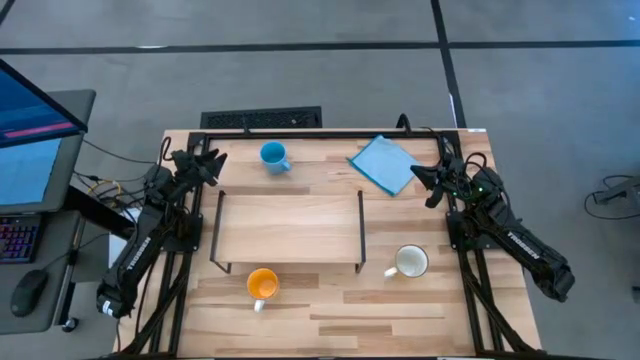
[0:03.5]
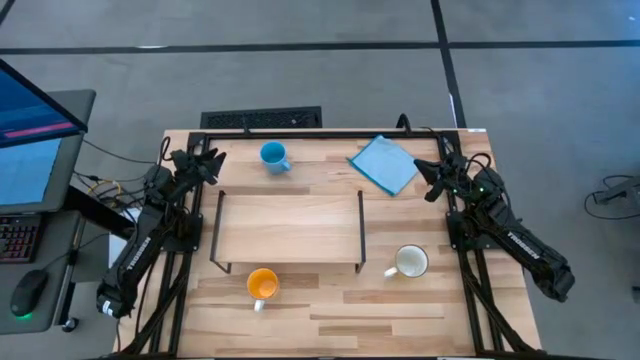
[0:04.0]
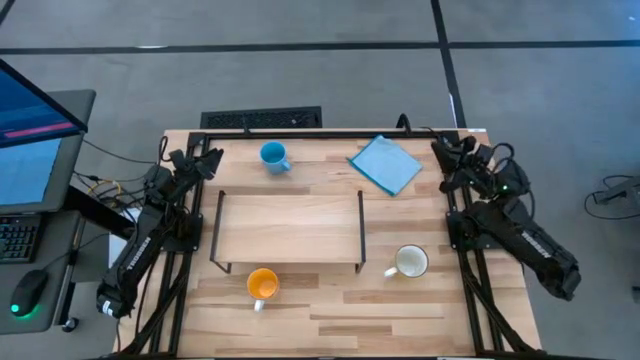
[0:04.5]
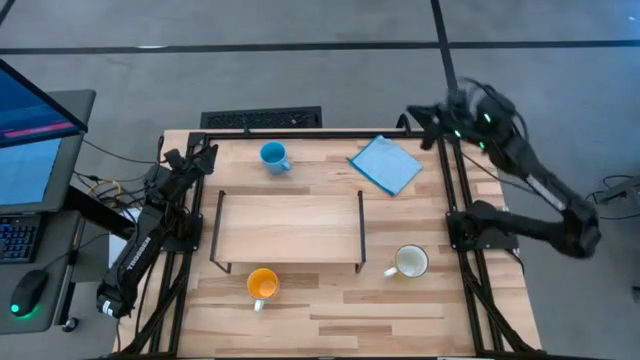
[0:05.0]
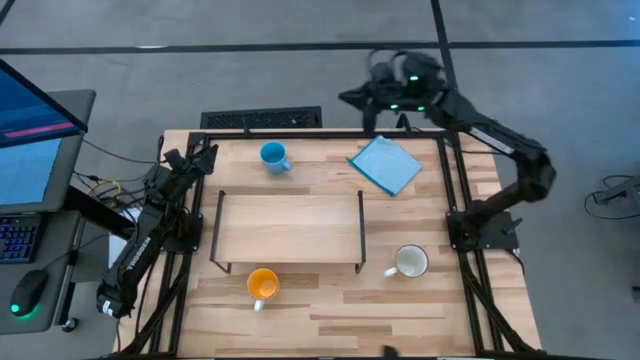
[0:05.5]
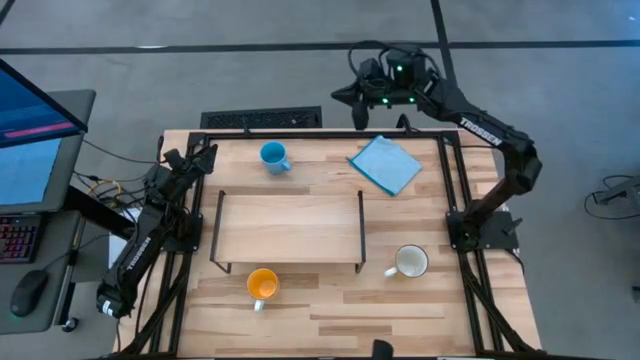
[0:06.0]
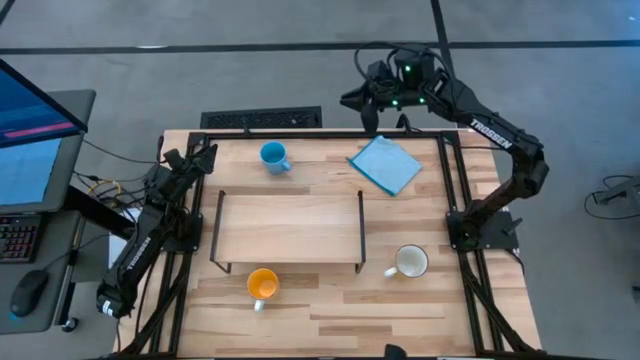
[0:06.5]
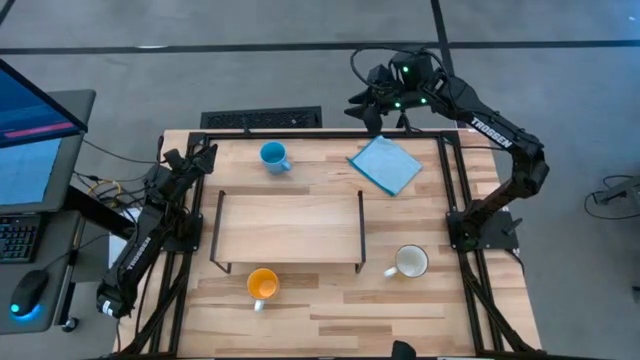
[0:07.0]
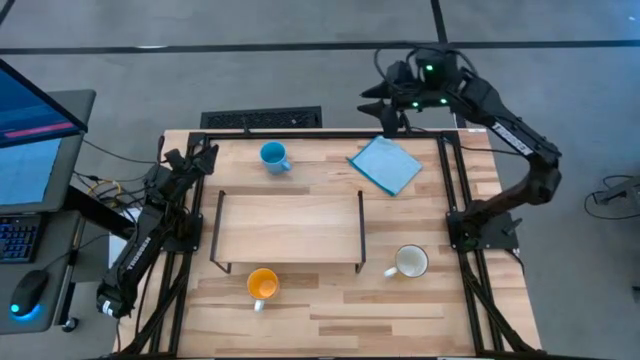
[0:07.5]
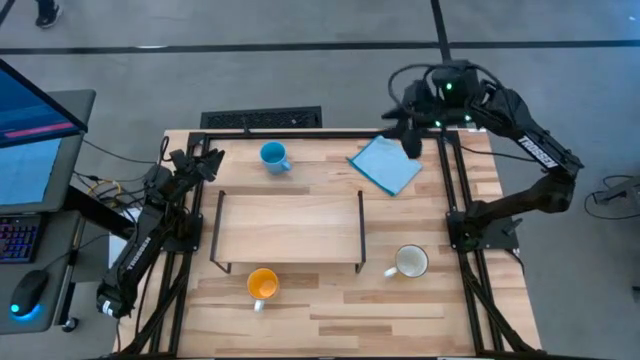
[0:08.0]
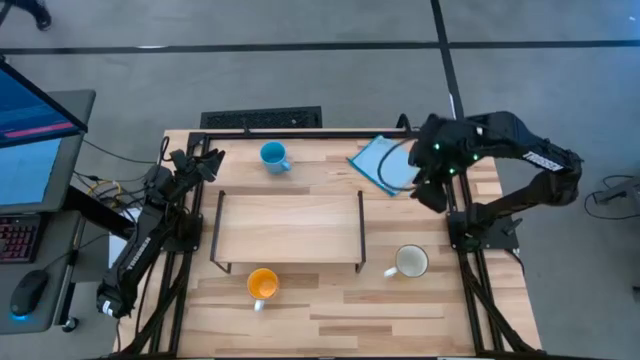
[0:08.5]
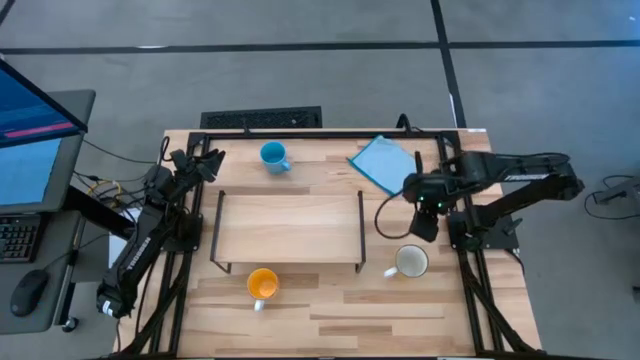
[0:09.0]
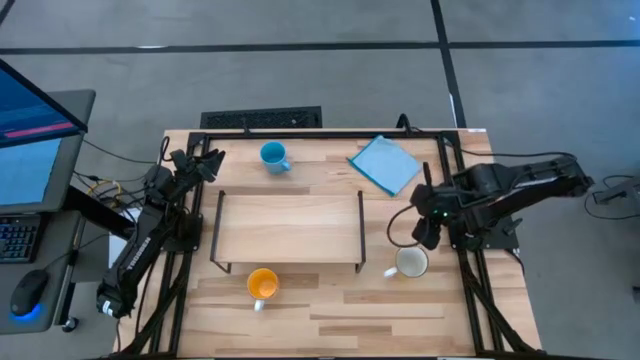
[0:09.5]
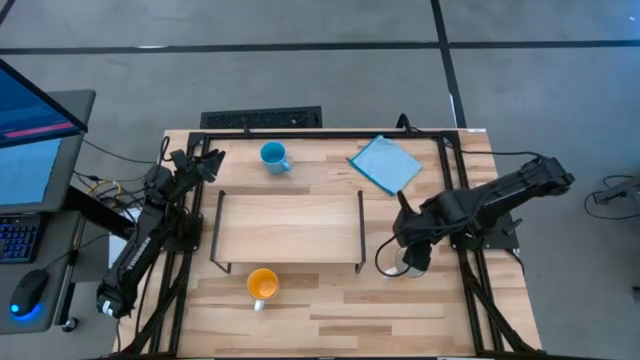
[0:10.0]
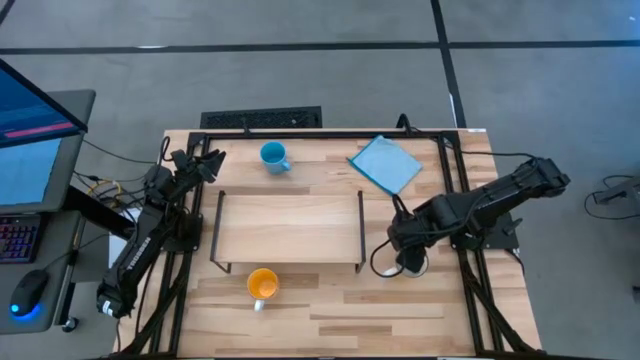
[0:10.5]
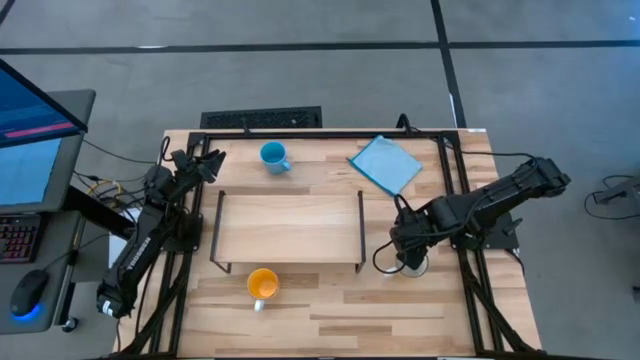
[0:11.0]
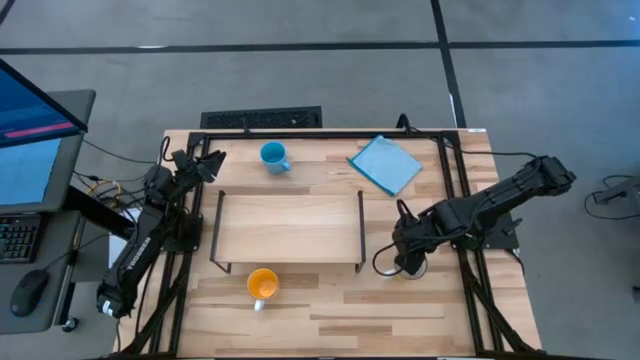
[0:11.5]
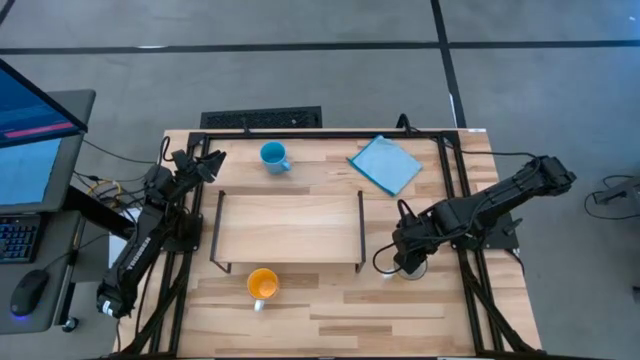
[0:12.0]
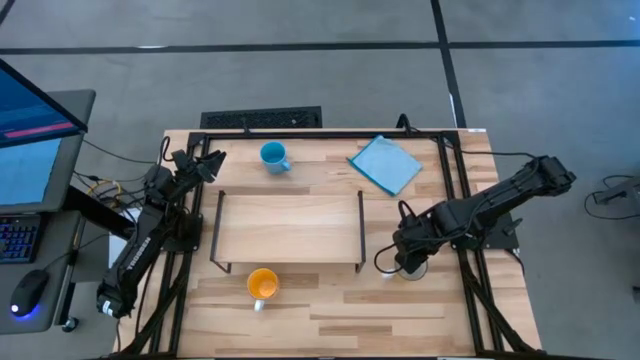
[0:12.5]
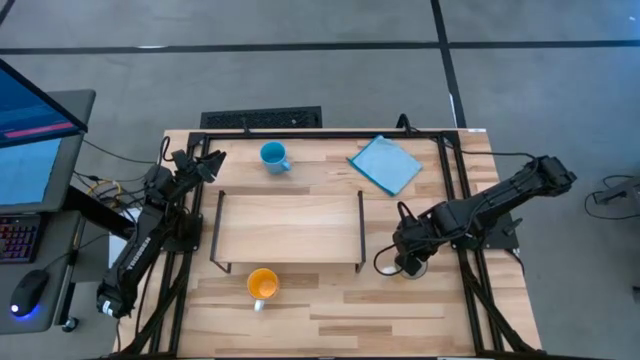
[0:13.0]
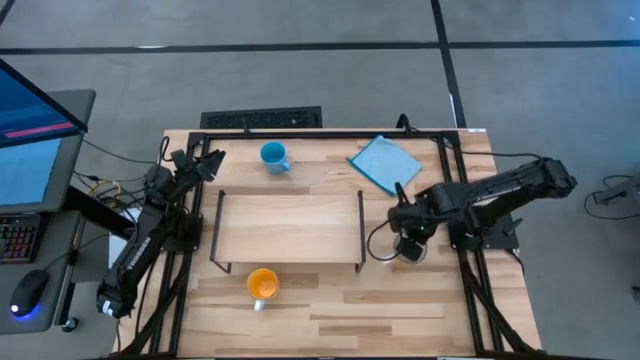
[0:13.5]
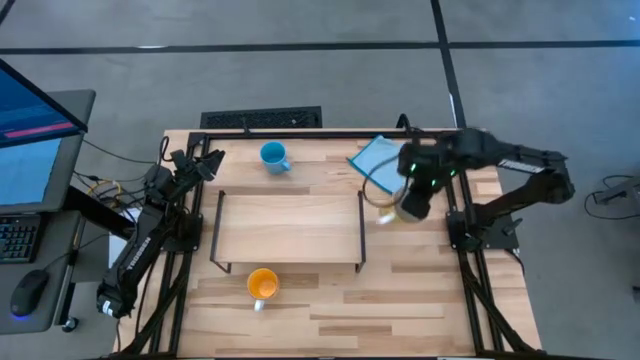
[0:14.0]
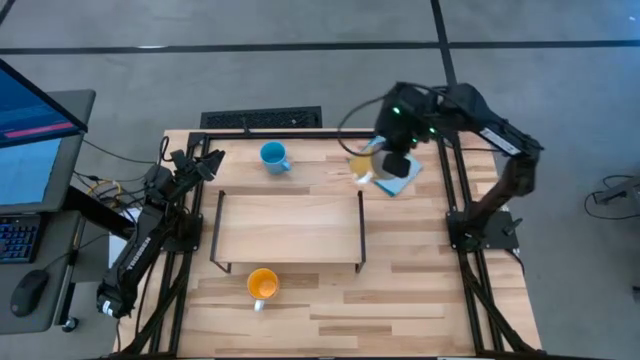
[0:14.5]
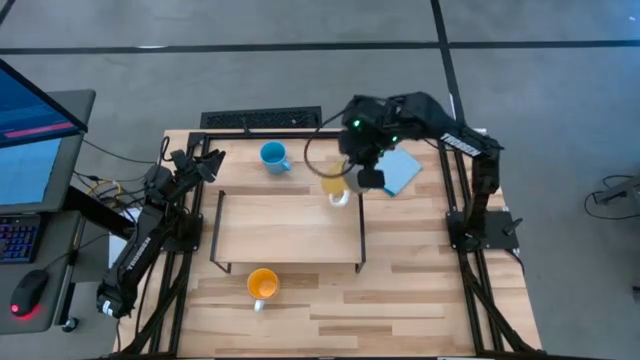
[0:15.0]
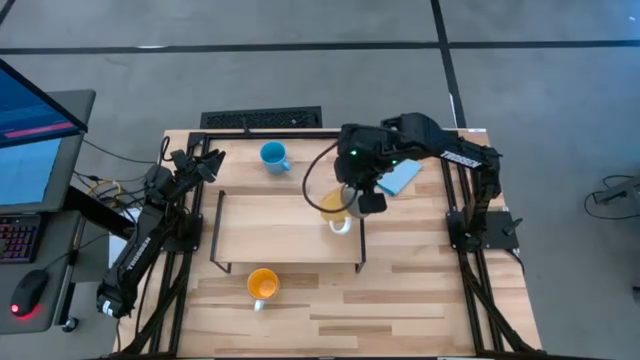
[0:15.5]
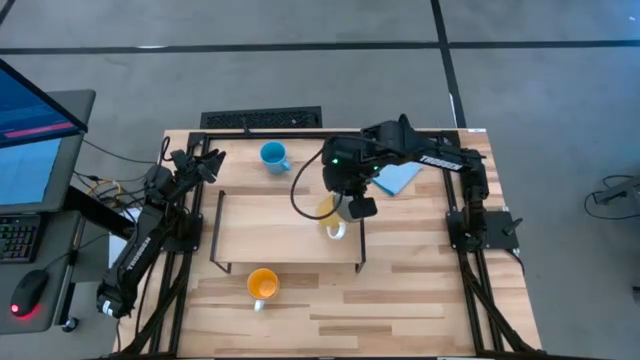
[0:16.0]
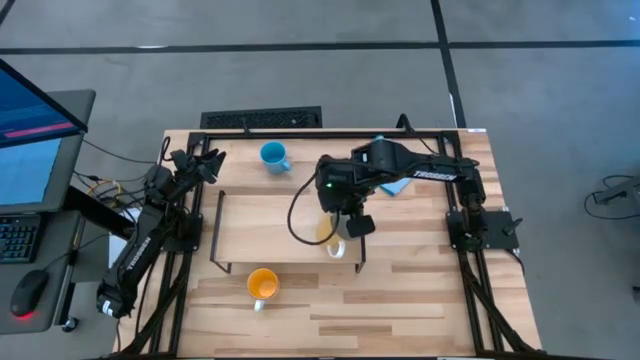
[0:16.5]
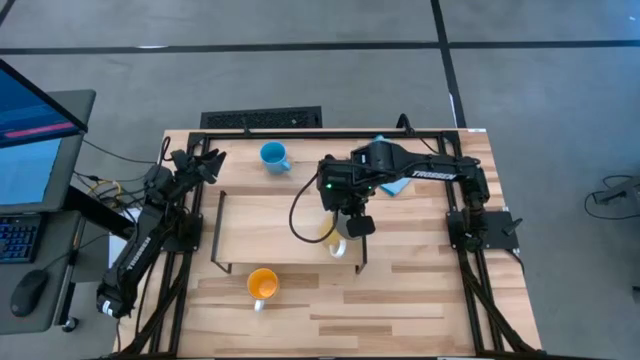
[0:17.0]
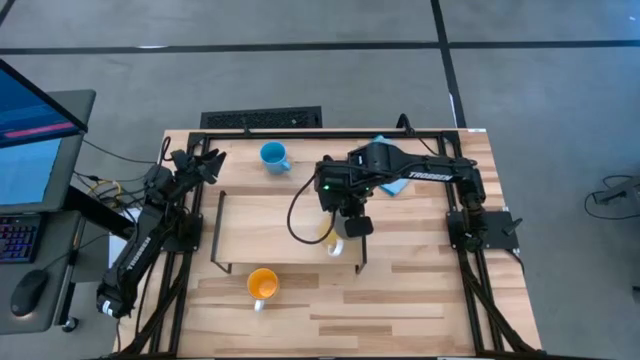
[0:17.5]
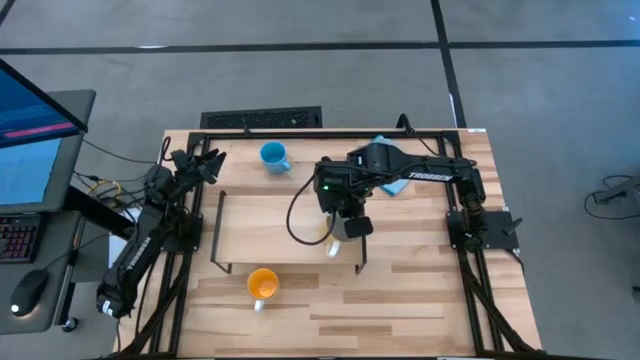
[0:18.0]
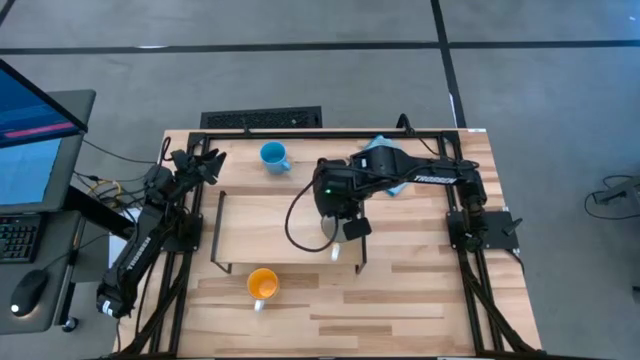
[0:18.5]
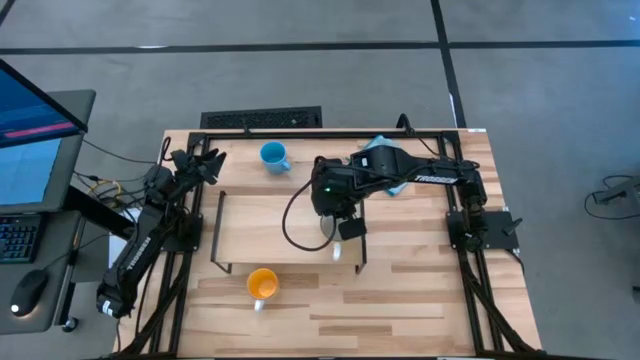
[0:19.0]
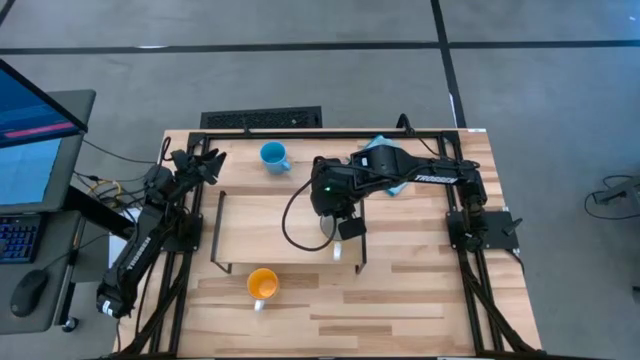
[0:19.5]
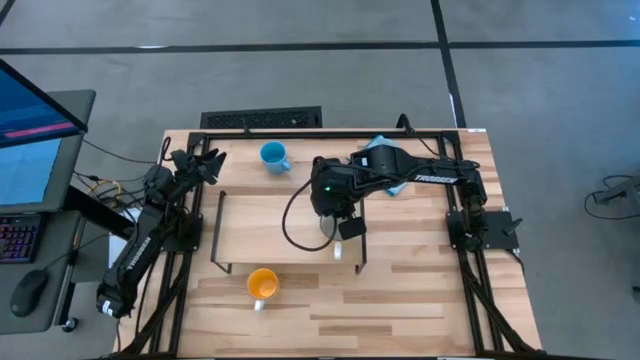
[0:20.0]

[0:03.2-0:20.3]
Task: Stack small to large cups/mugs on shelf
Put the yellow and white mug on the shelf

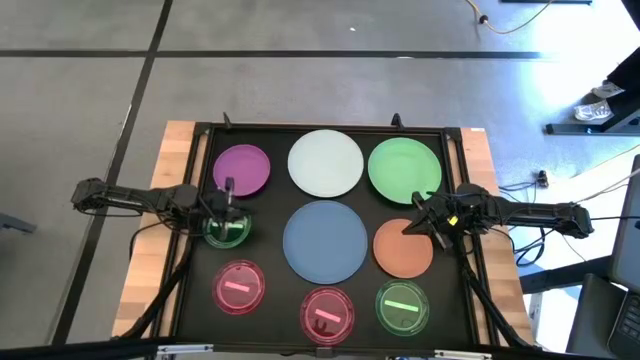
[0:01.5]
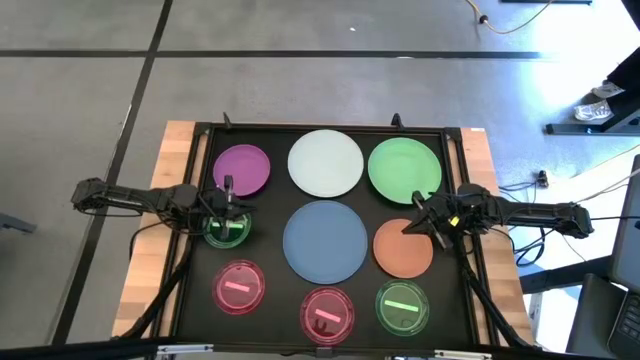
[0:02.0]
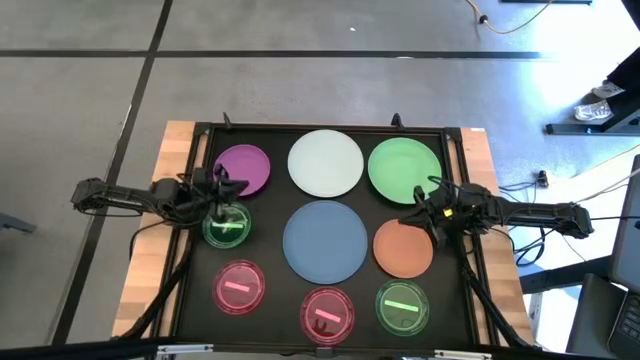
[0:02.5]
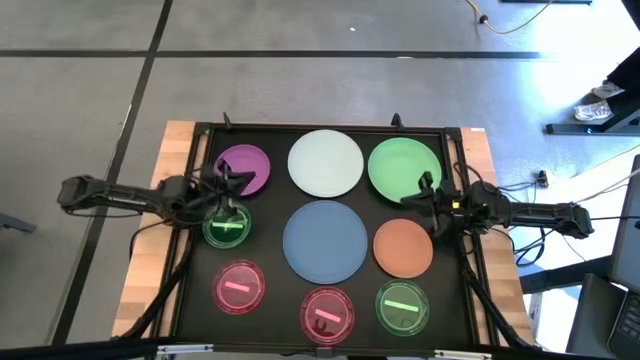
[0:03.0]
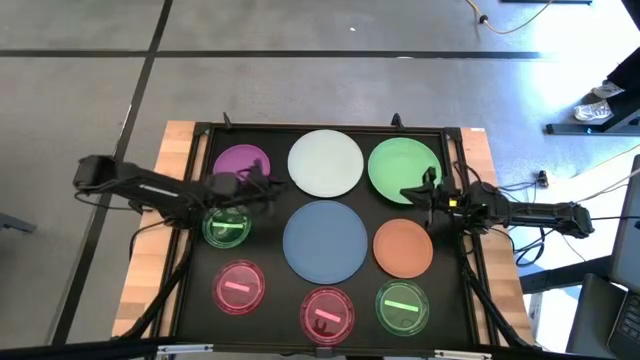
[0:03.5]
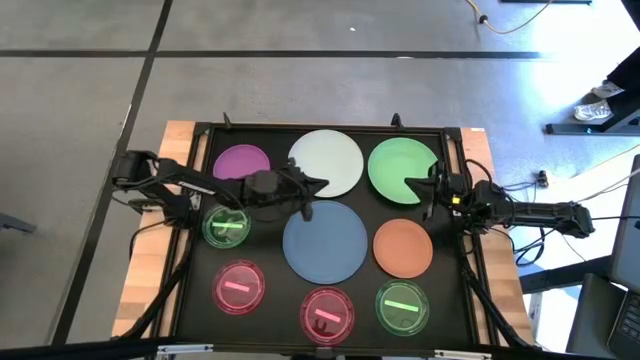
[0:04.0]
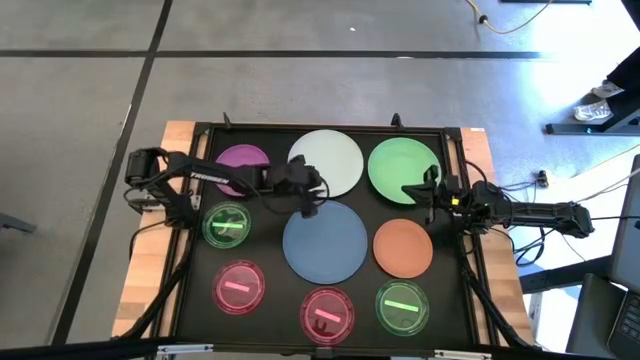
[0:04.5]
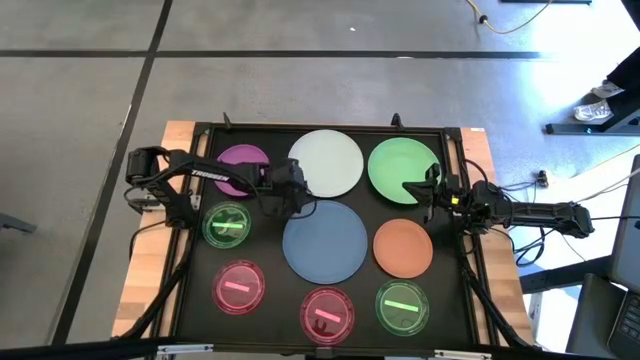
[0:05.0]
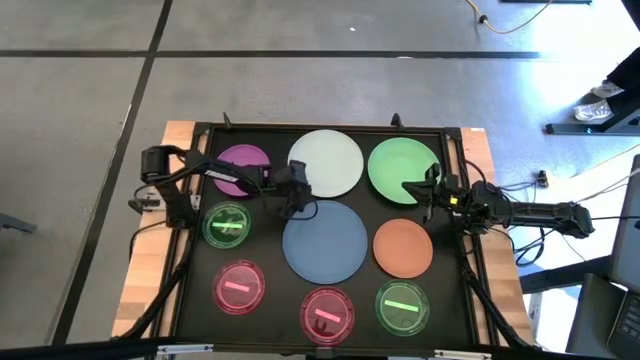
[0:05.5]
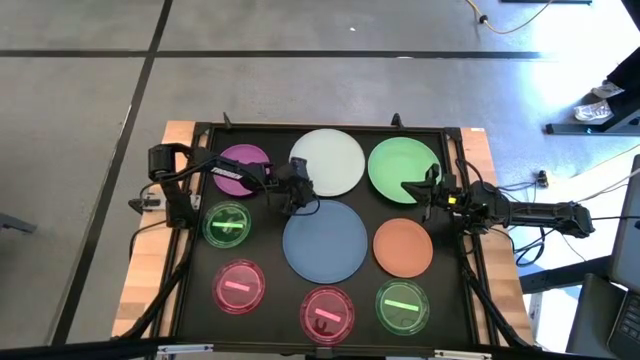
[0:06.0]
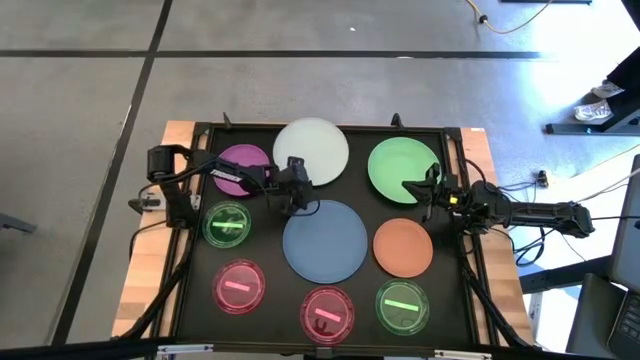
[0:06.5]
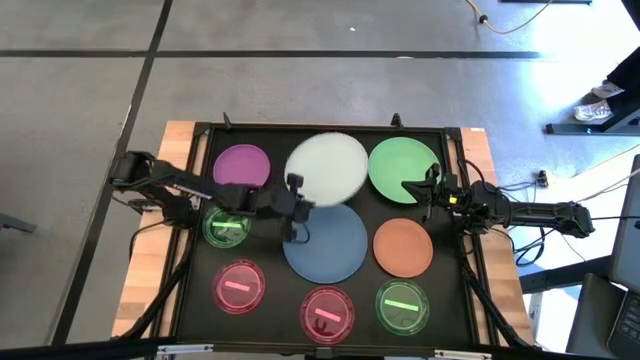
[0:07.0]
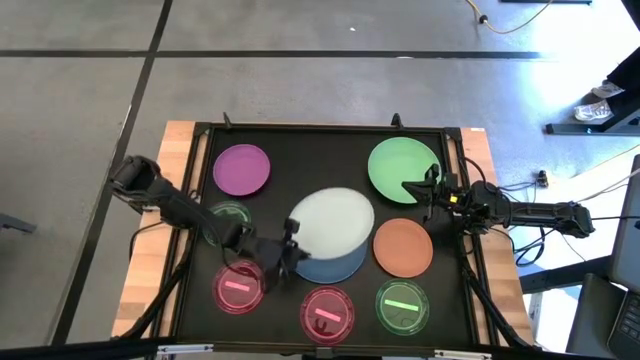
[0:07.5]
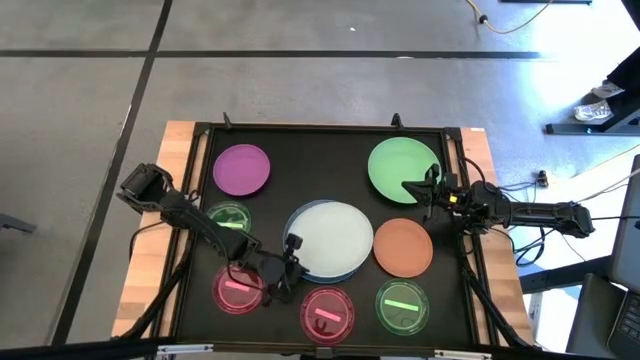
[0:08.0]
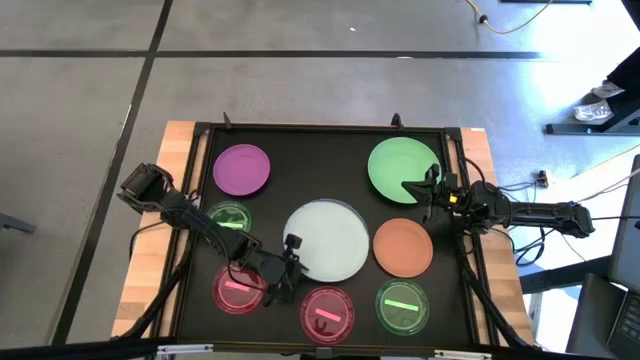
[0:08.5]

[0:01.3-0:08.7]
Task: Stack plastic plates
Stack the white plate on top of the blue plate
